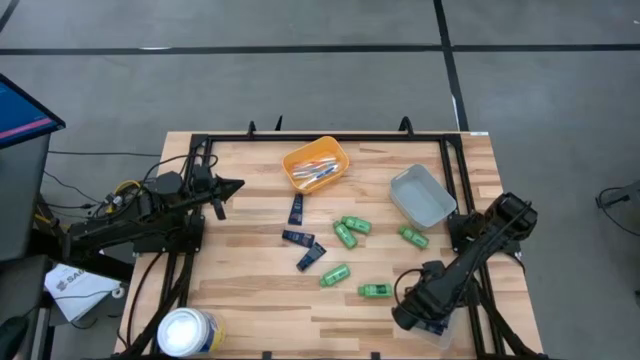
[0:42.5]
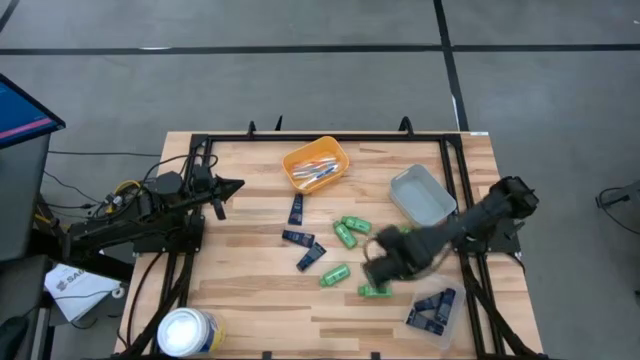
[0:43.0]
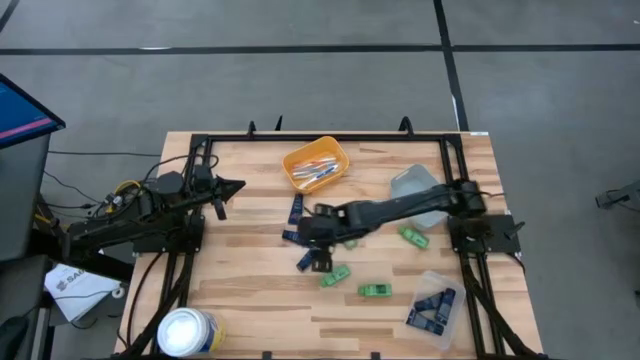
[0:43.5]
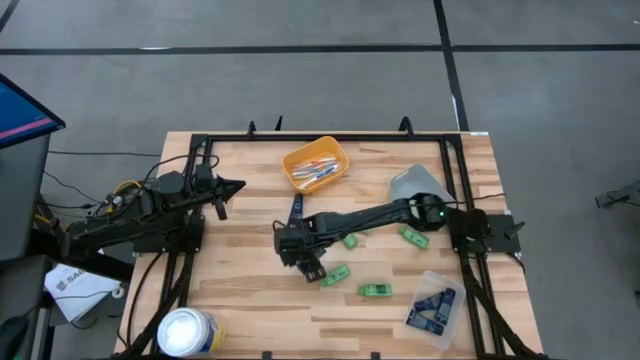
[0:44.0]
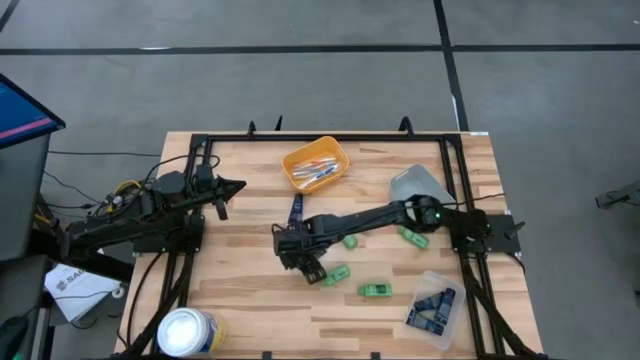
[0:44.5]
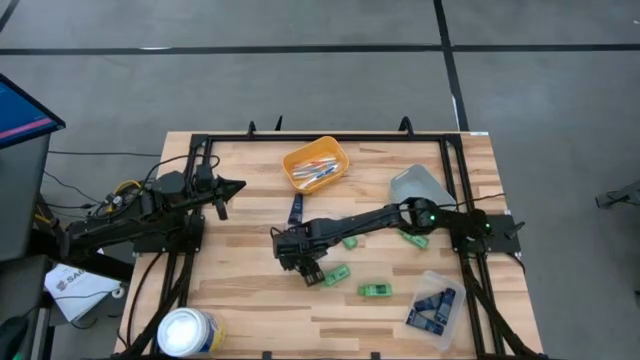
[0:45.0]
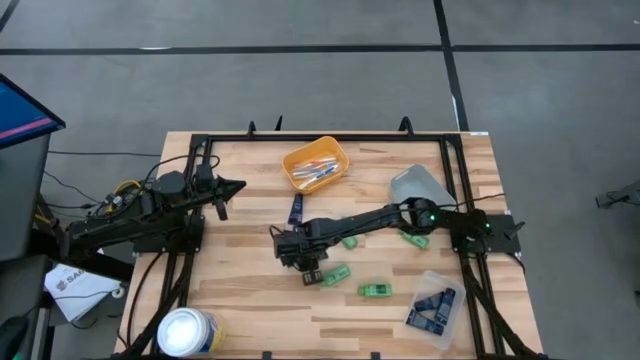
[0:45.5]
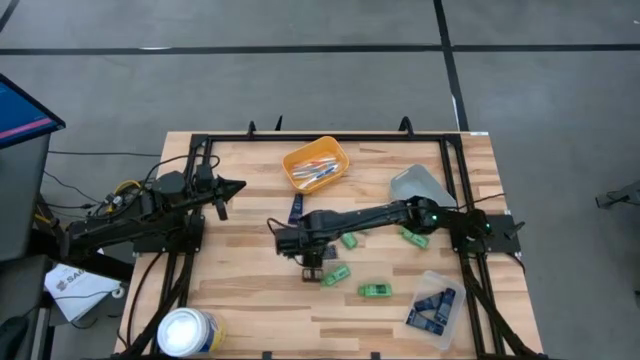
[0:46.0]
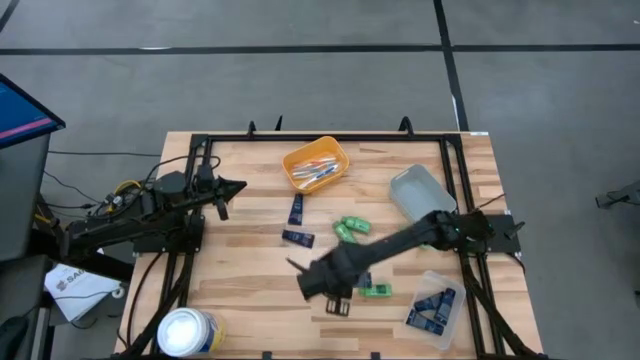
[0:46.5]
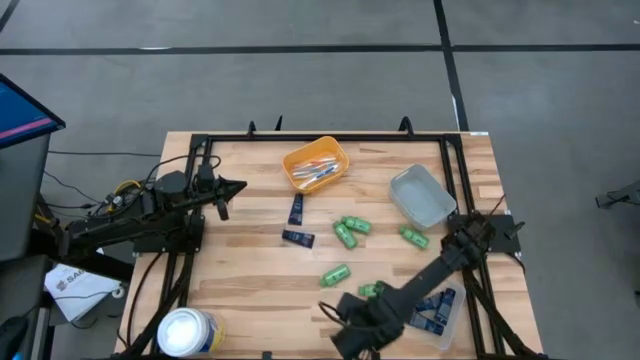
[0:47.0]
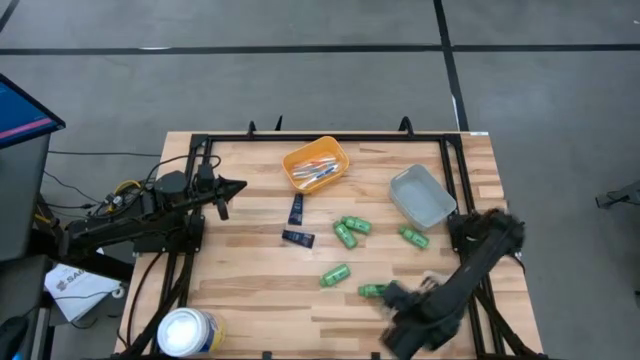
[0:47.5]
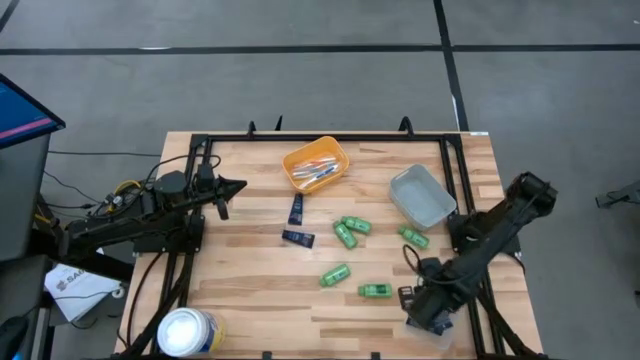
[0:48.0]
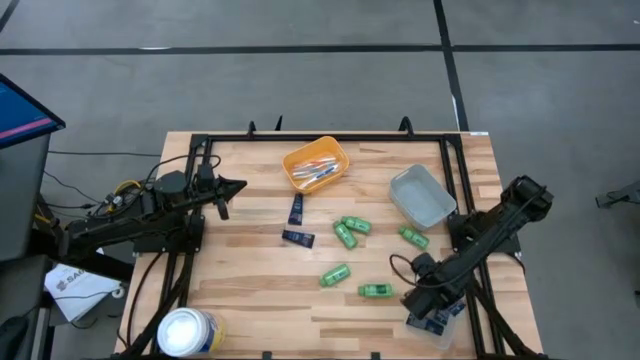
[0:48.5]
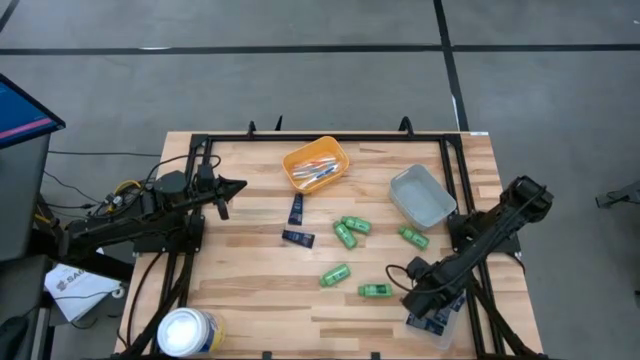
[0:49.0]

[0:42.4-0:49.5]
Task: Pick & Place Travel size toiletries
Put the dark blue shave cream into the transparent bin

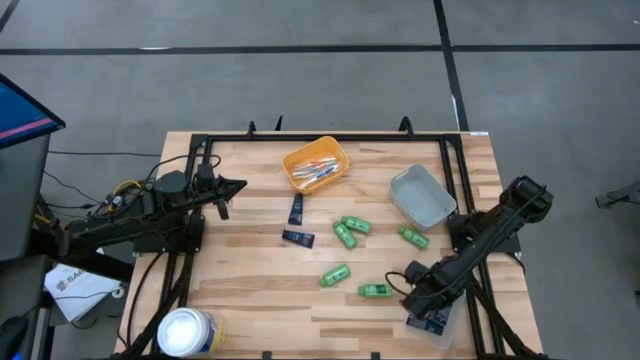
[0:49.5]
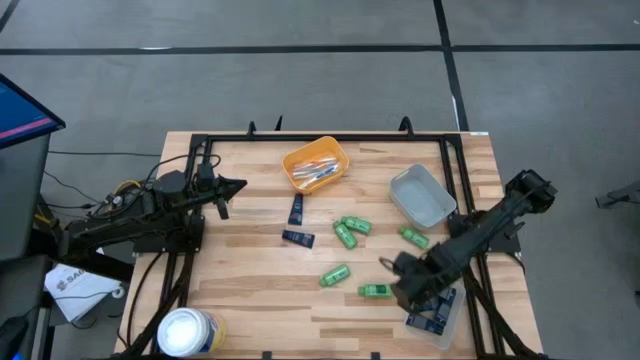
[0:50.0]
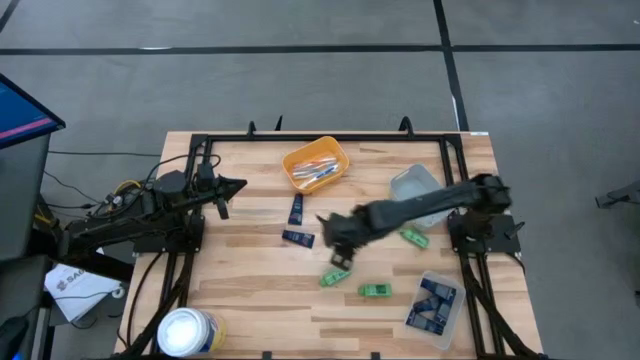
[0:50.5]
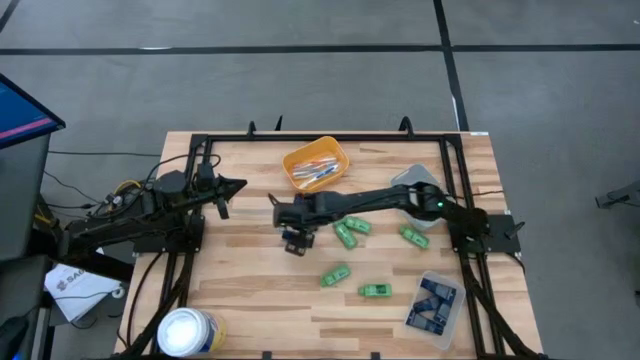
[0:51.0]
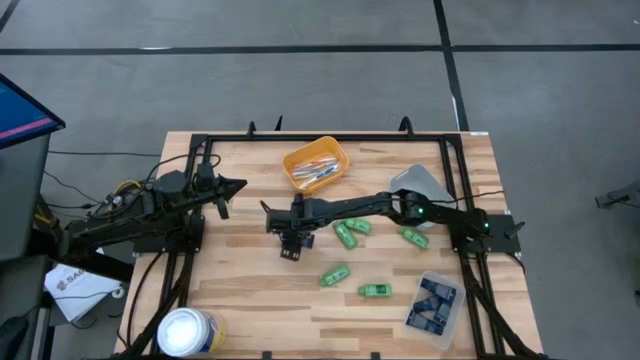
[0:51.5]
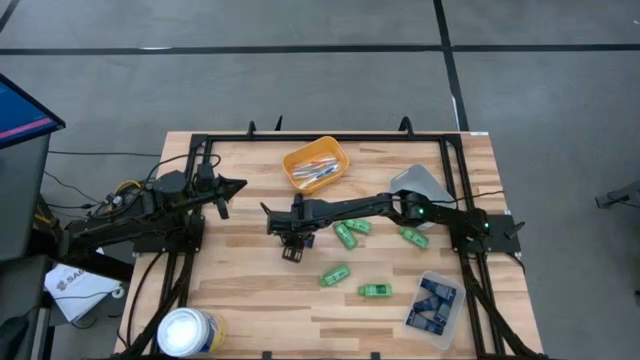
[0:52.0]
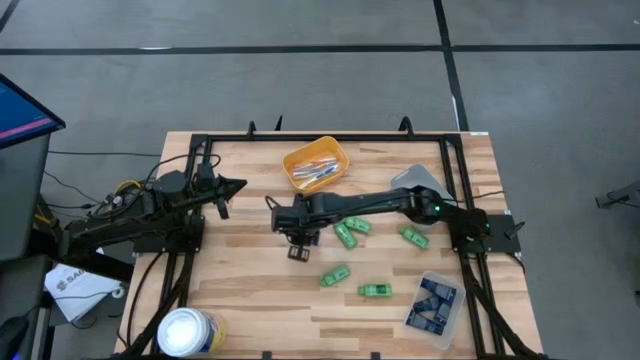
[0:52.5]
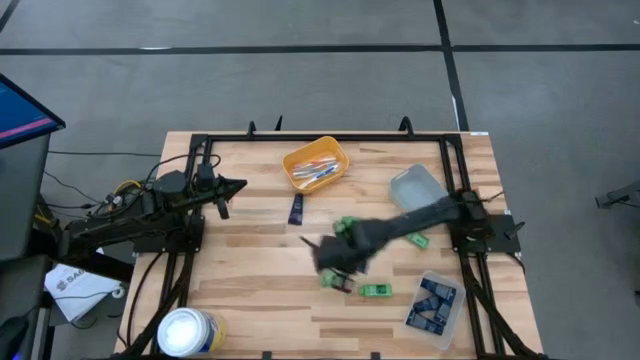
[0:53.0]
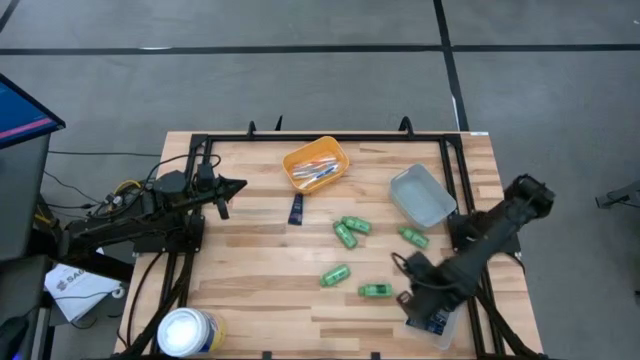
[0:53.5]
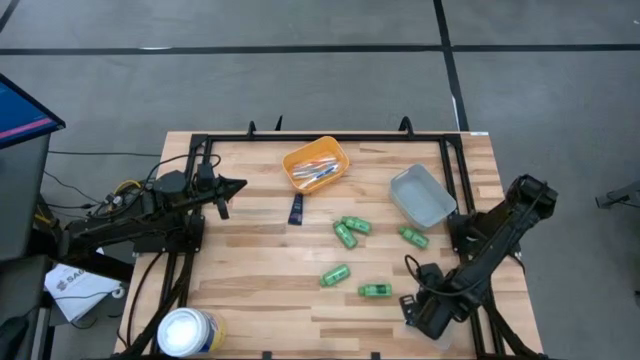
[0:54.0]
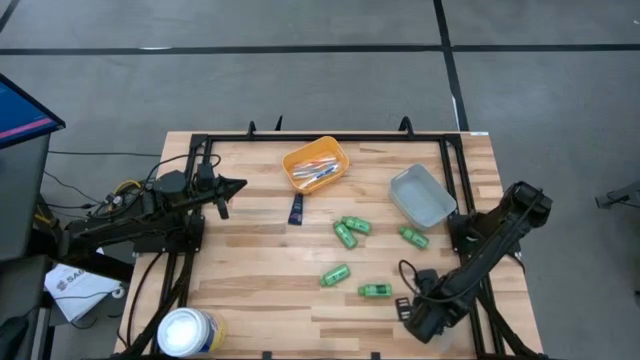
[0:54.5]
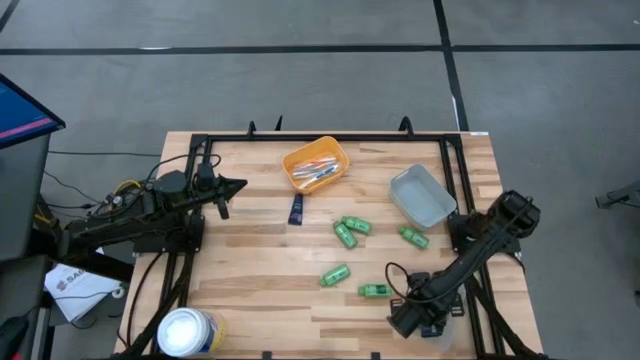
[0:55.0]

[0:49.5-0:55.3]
Put the dark blue shave cream into the transparent bin

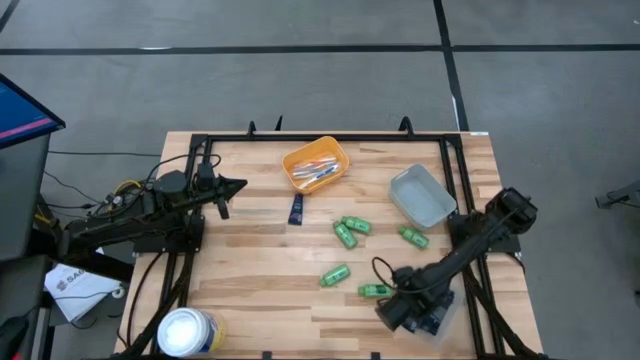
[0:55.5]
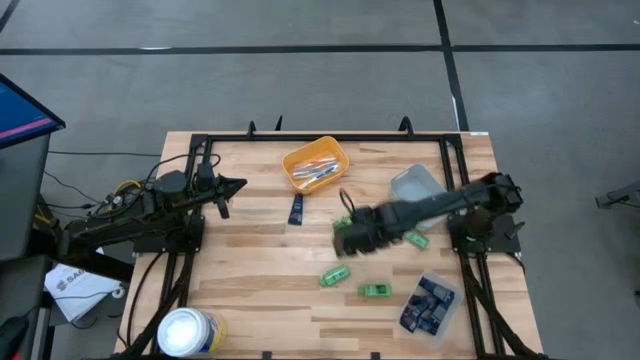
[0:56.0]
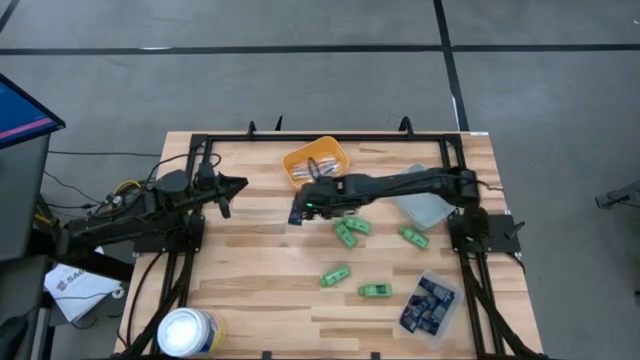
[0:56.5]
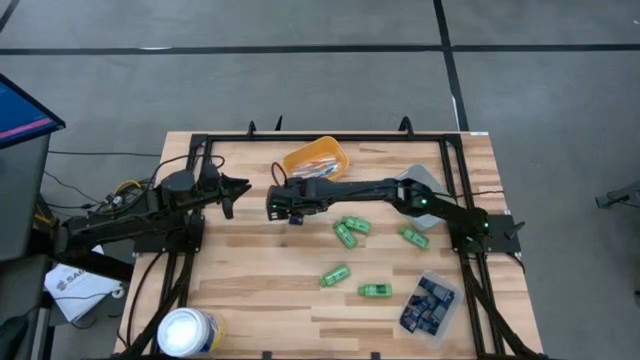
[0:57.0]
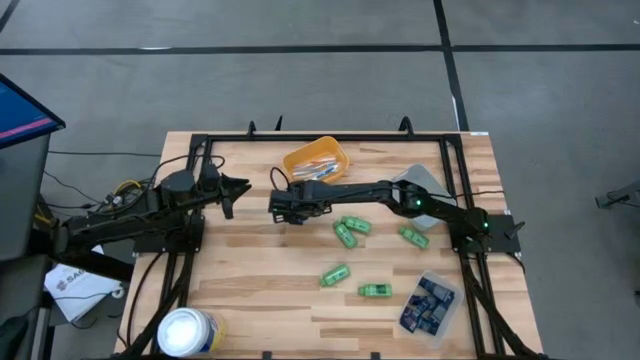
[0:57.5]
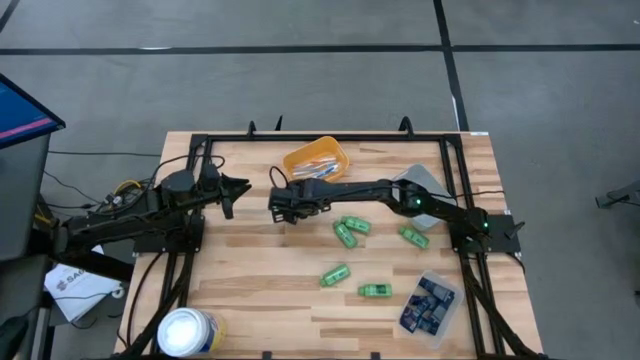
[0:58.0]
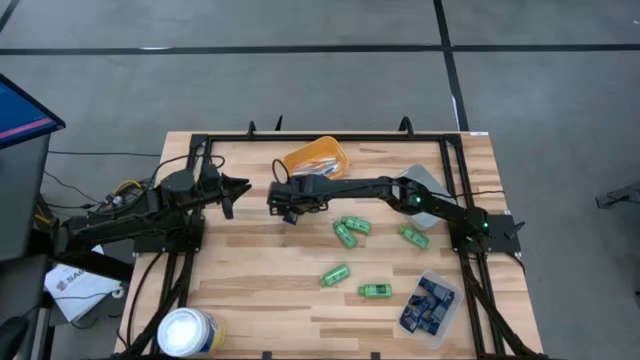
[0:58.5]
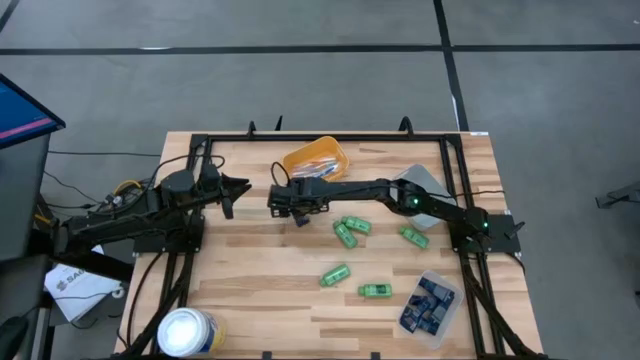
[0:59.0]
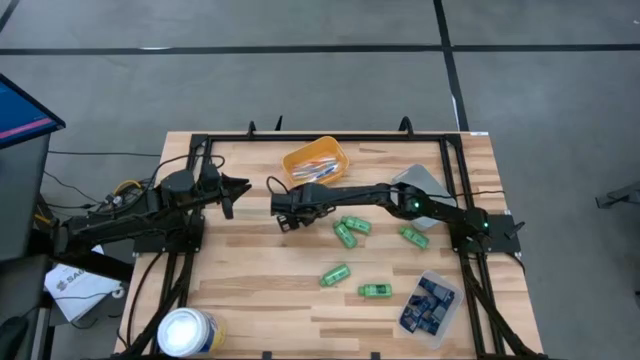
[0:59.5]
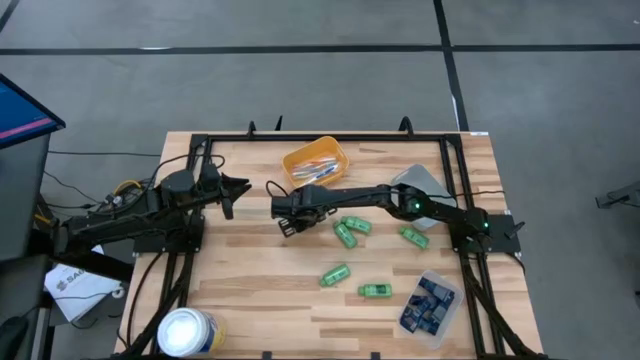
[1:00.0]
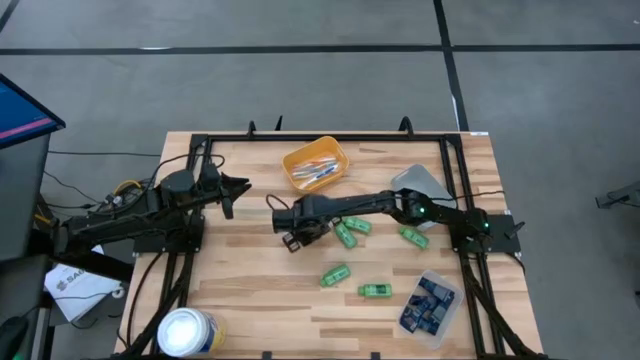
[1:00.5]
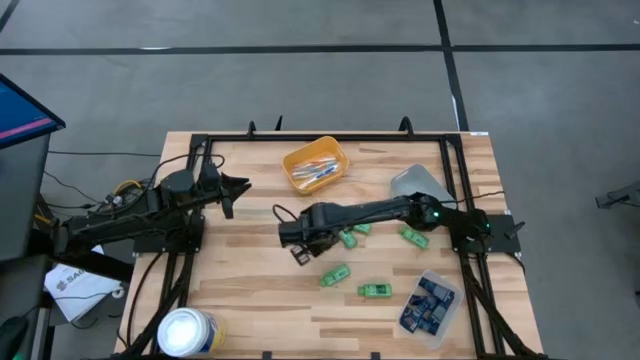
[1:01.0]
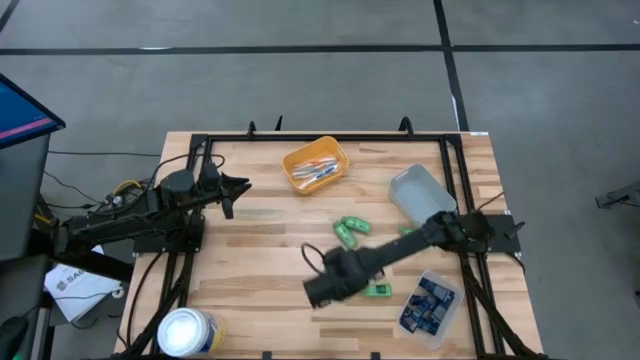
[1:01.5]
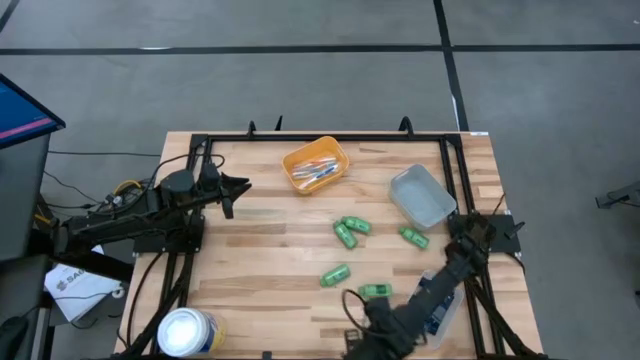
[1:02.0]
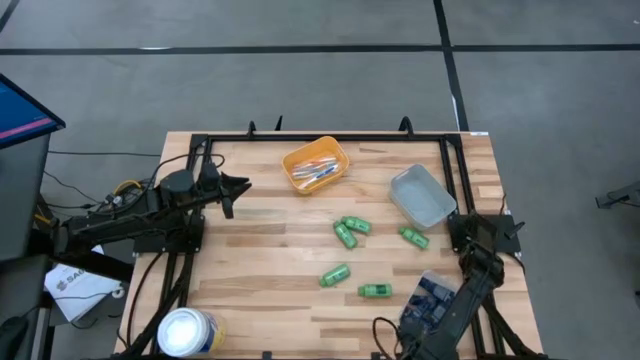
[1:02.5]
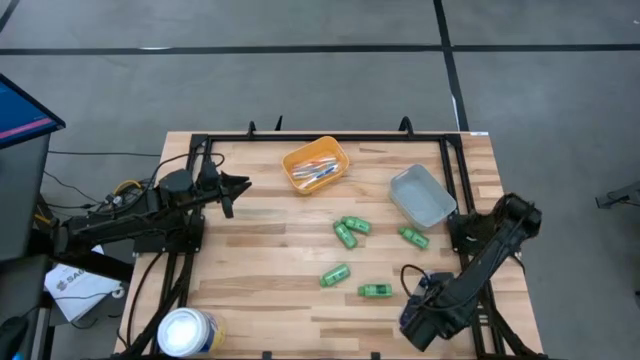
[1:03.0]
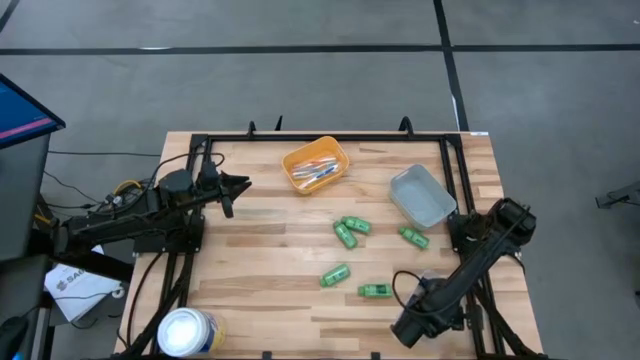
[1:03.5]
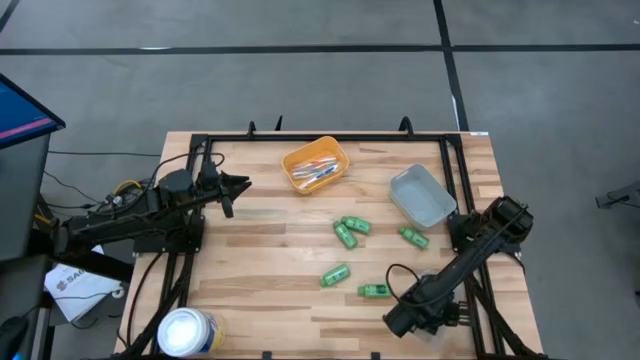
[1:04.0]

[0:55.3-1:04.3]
Put the dark blue shave cream into the transparent bin
